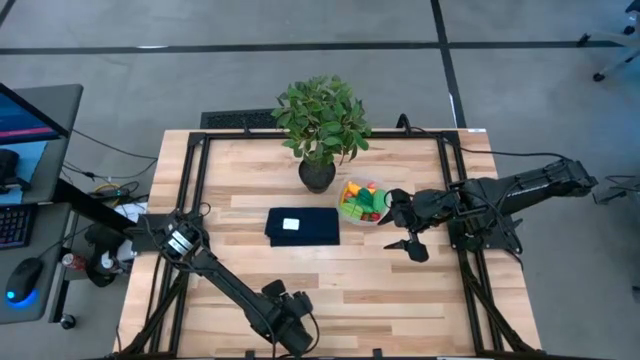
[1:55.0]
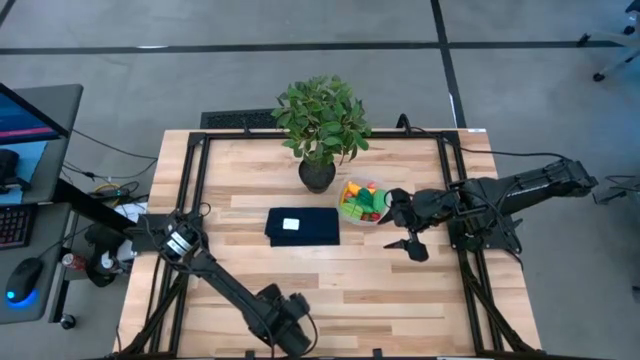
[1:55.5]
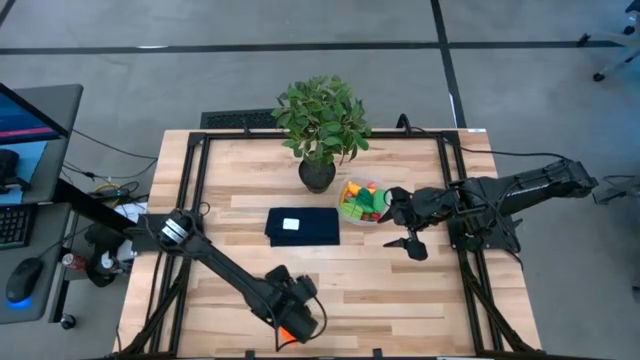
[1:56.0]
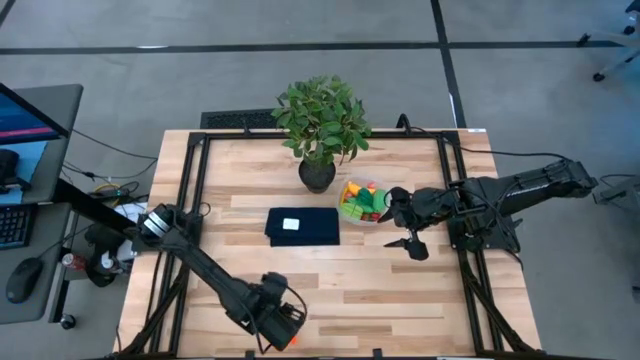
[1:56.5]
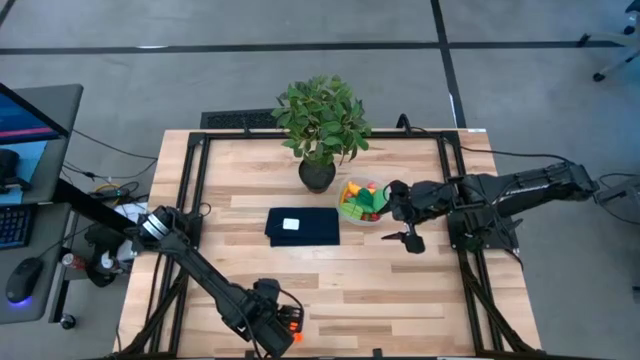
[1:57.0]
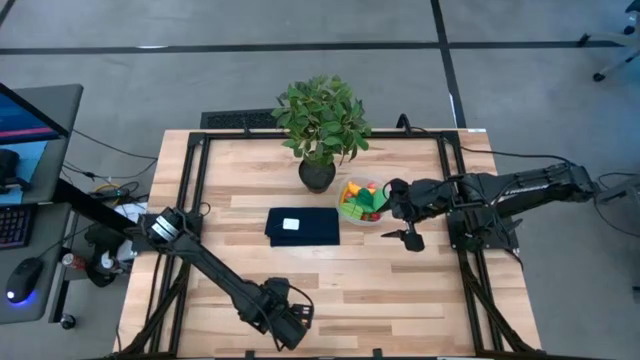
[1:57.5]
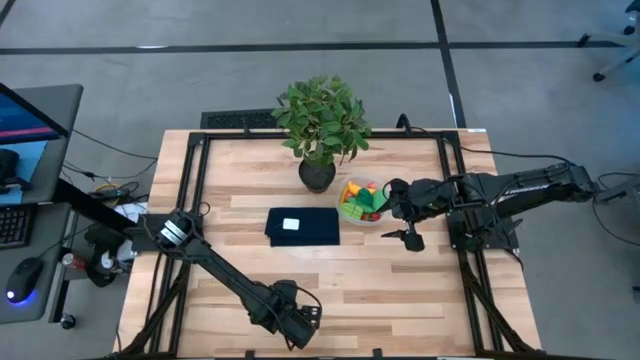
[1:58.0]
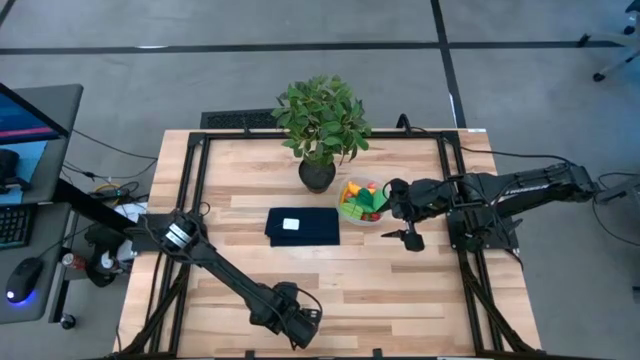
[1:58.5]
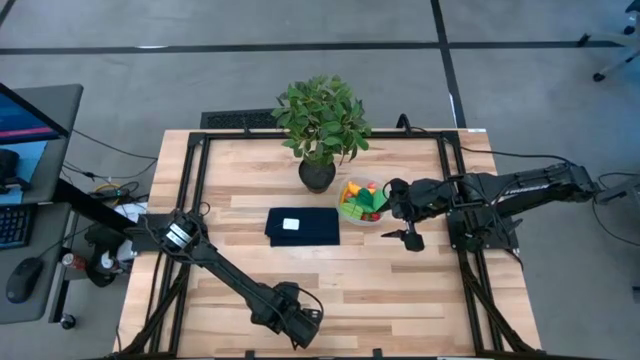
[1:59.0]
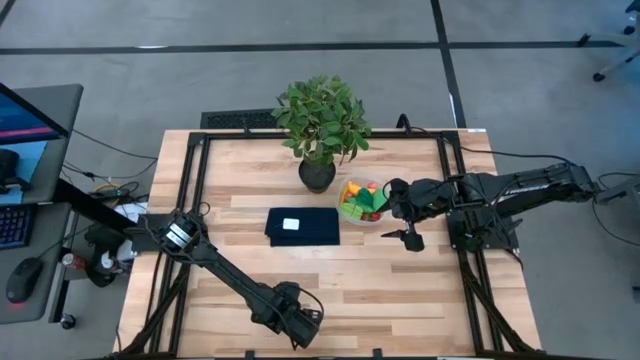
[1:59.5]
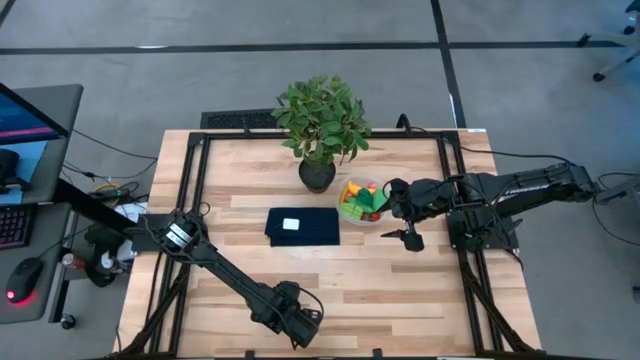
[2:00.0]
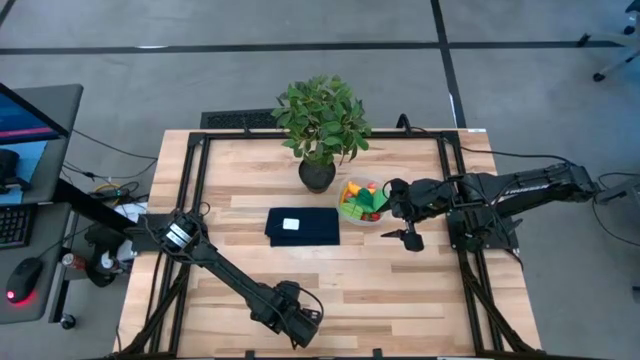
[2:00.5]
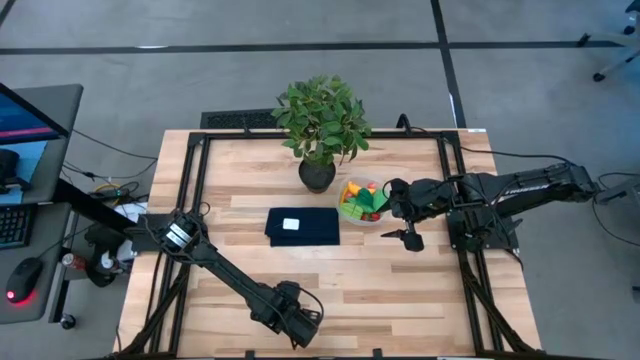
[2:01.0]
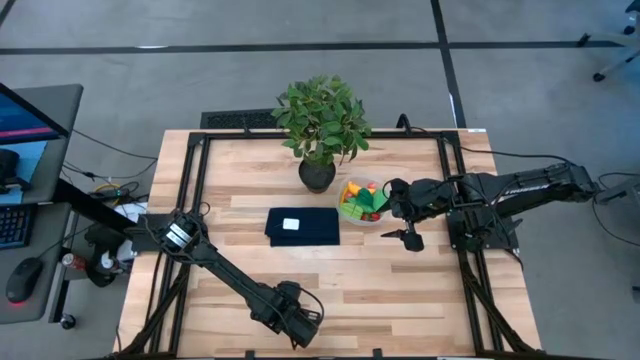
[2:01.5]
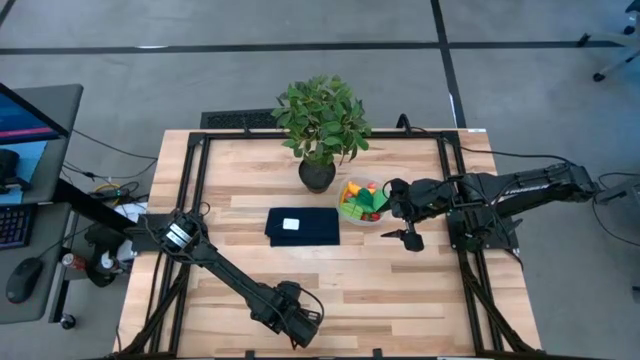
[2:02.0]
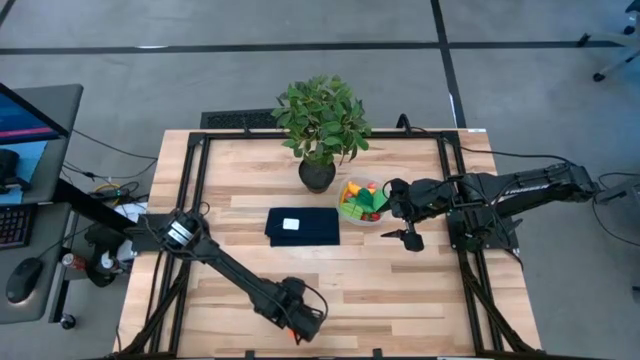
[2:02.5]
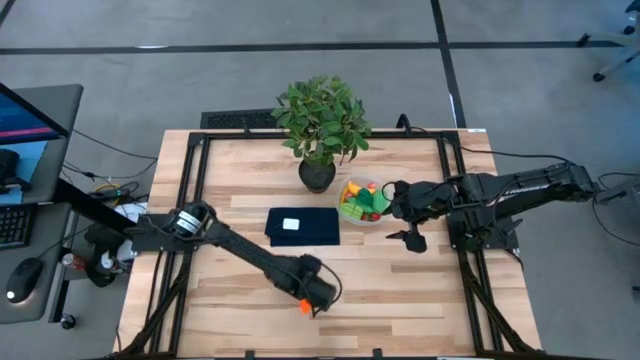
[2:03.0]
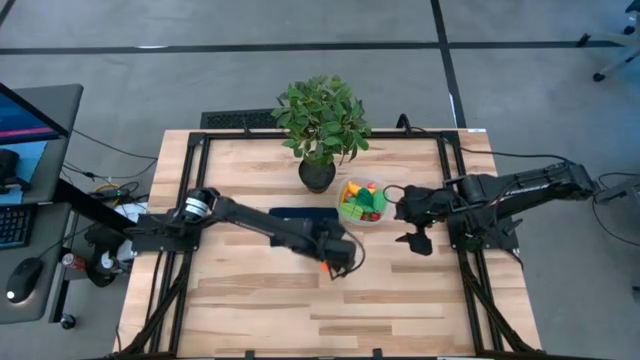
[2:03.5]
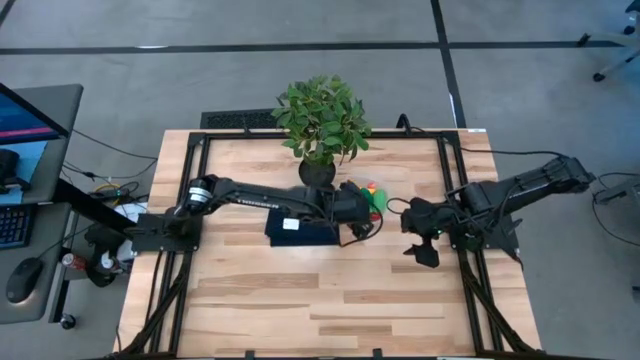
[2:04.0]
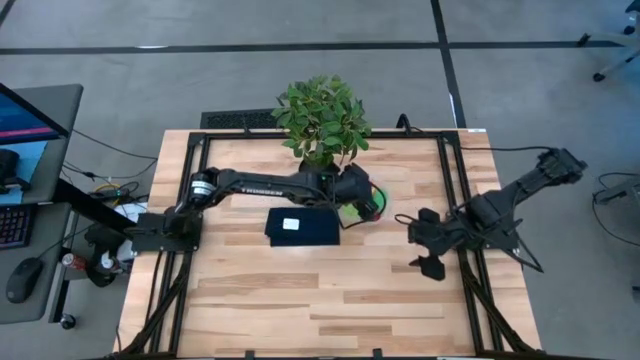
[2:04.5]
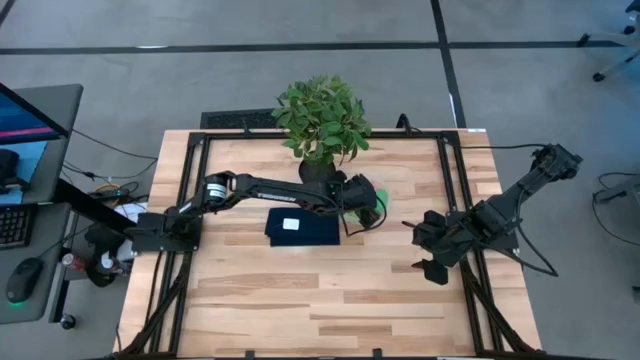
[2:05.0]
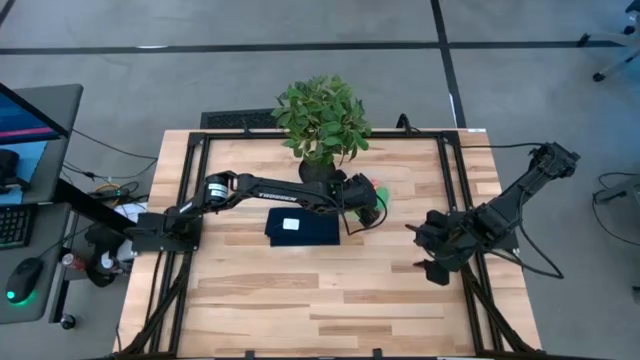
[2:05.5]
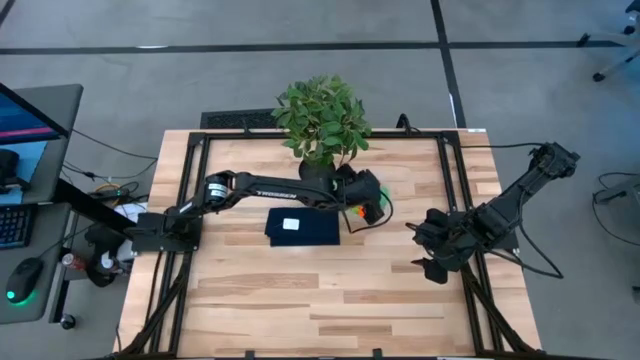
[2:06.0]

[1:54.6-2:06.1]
Task: Pick and placing Produce into tupperware
Put the orange carrot into the transparent container

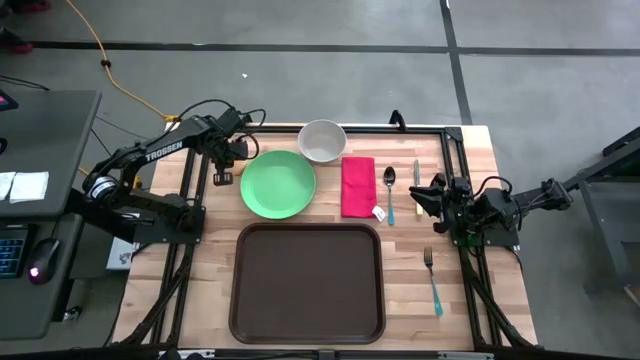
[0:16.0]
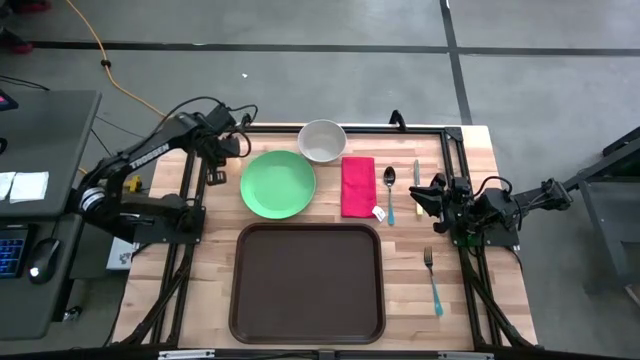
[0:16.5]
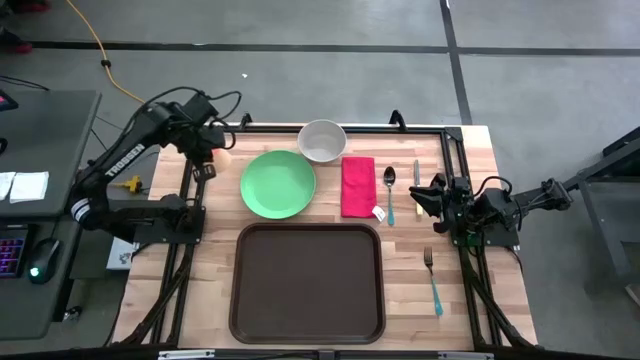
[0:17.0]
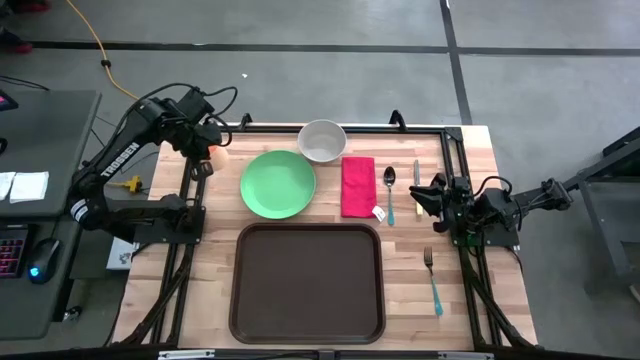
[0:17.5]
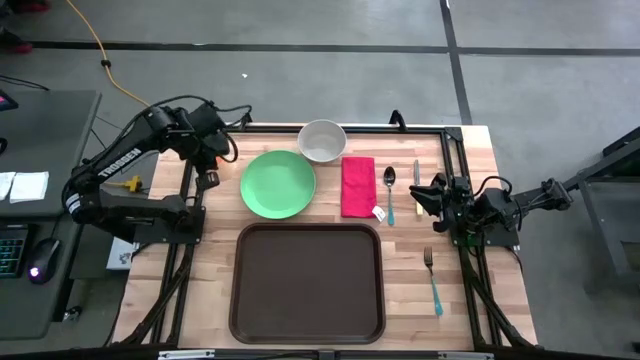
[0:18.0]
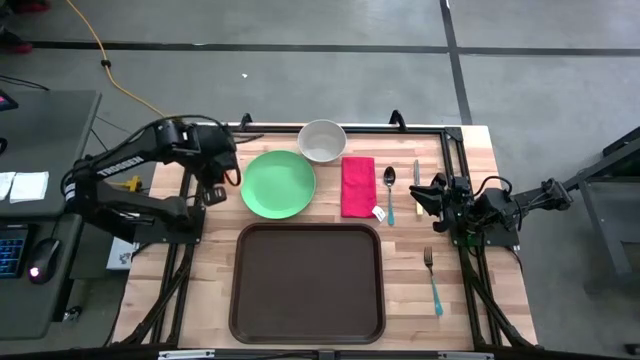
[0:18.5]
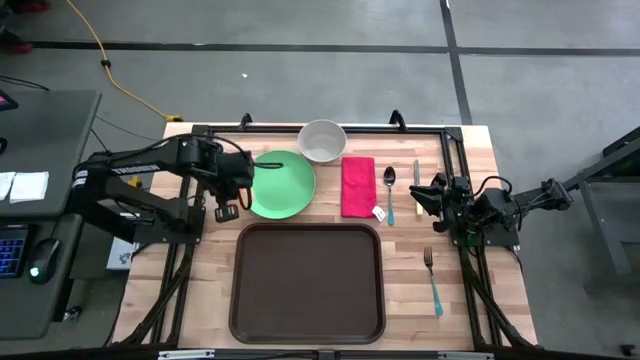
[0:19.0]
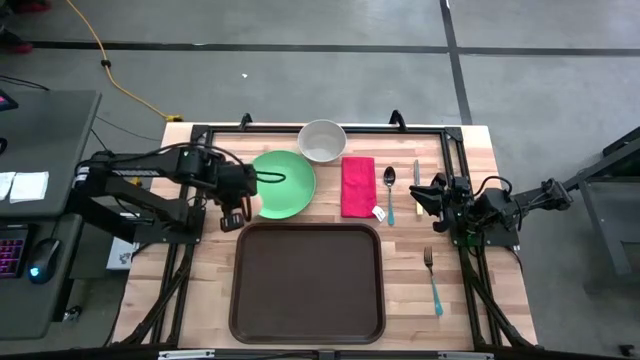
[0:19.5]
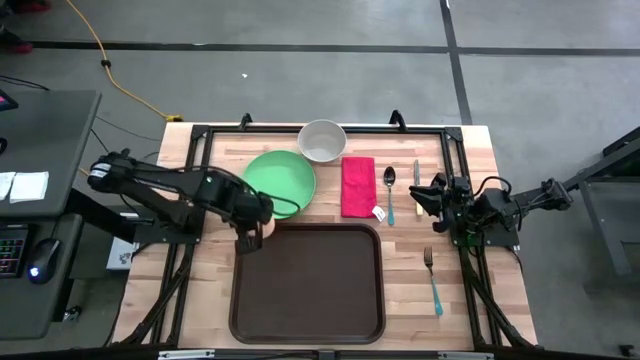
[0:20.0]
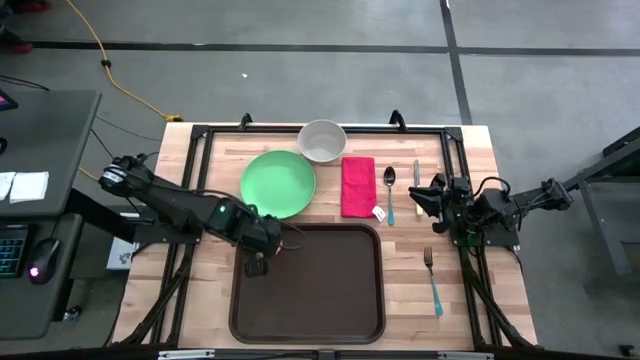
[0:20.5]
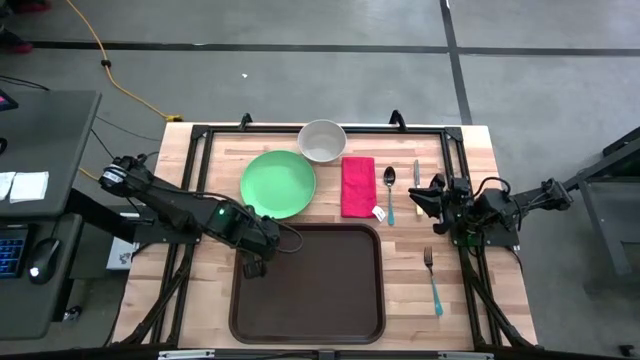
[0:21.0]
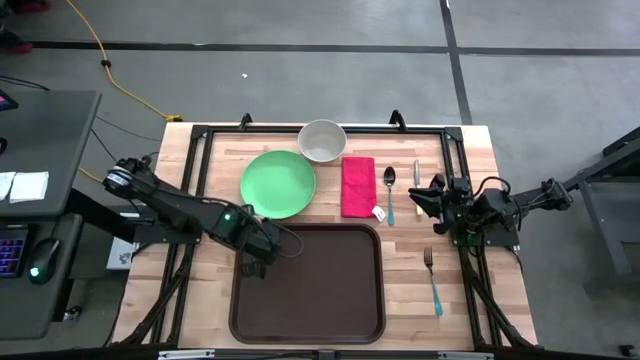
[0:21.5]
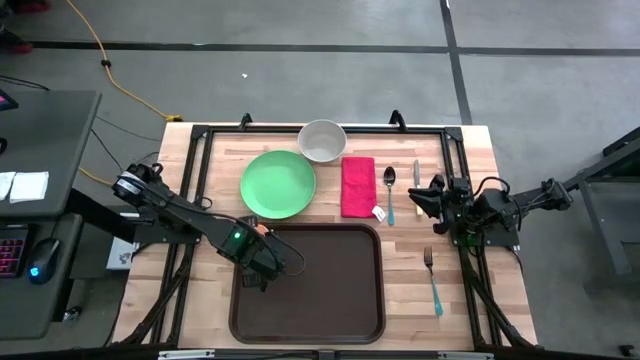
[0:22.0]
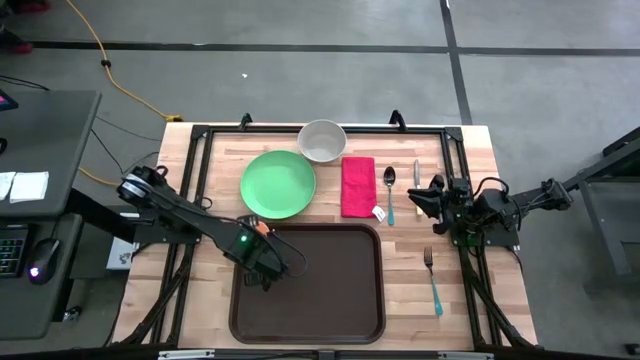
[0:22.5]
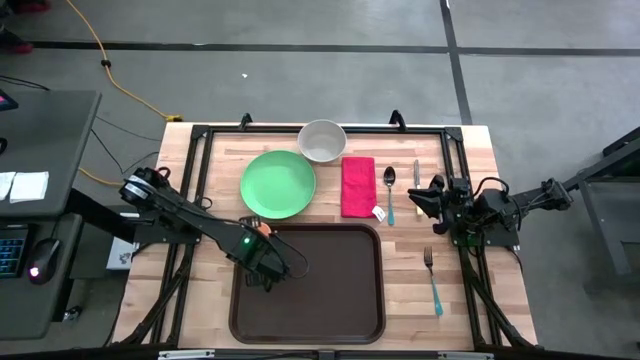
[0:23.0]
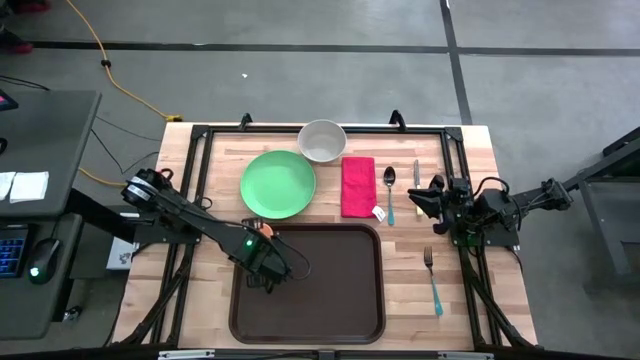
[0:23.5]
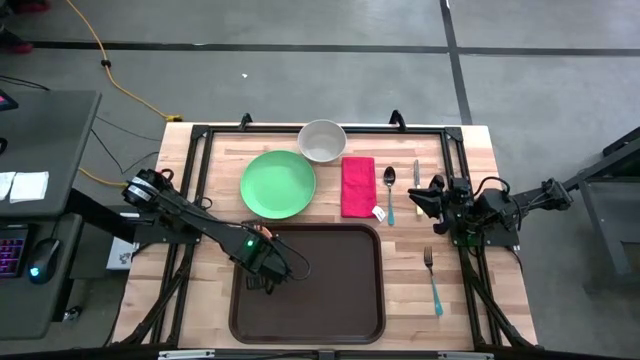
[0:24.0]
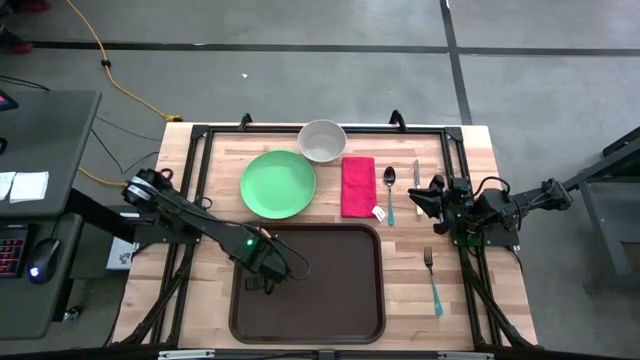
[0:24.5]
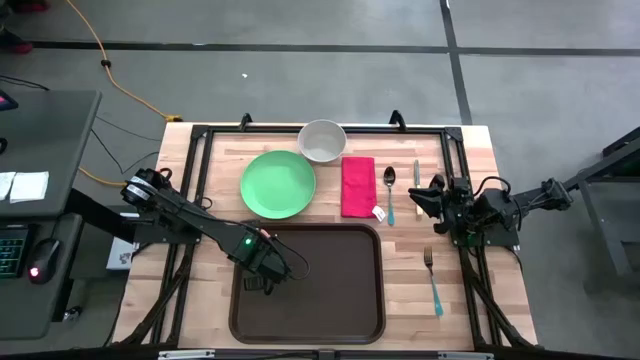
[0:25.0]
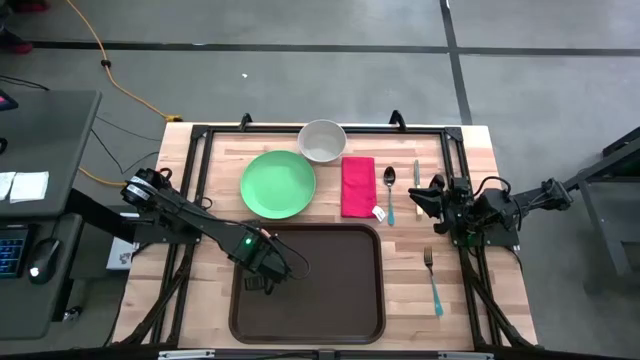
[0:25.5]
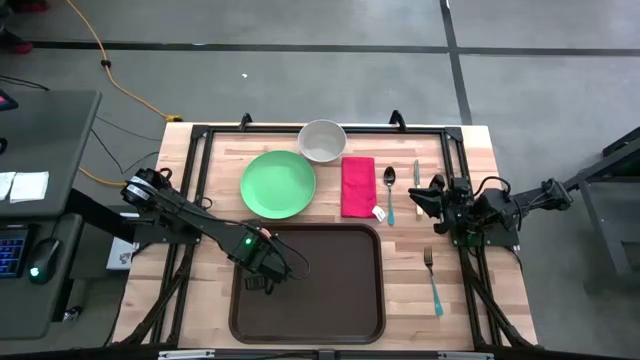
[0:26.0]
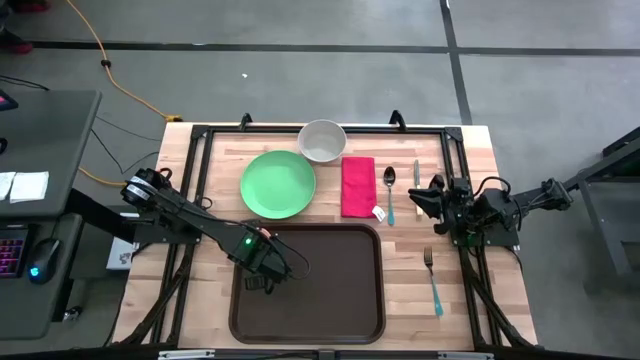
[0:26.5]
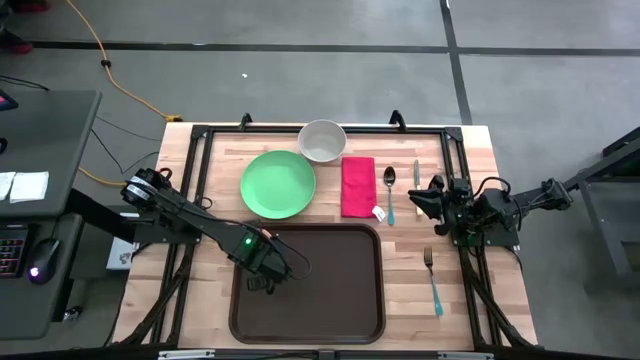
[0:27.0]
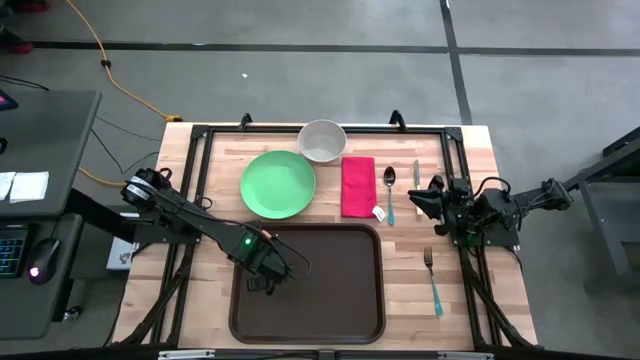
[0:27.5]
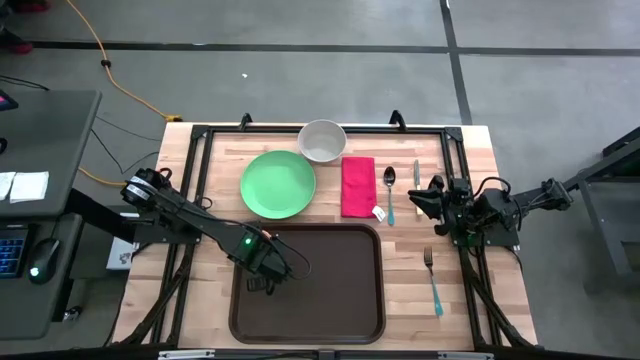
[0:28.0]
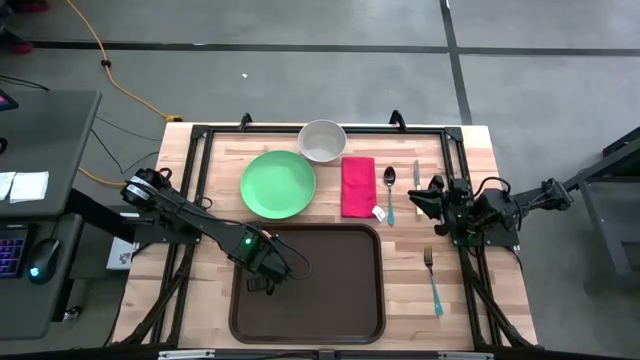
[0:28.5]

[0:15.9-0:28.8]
Task: Set up tray
Put the light orange cup on the brown serving tray
